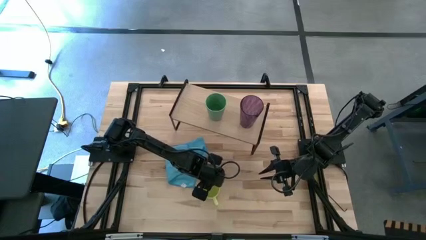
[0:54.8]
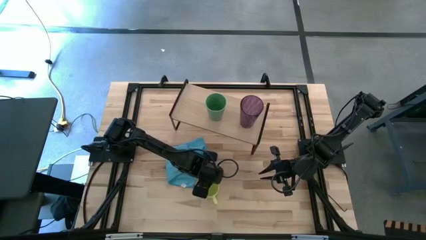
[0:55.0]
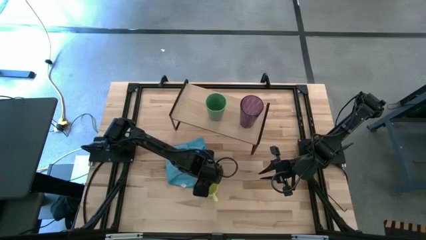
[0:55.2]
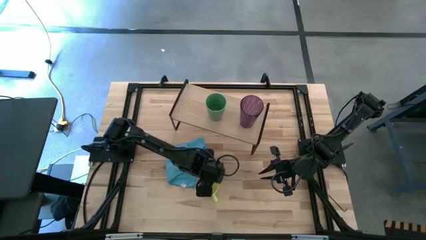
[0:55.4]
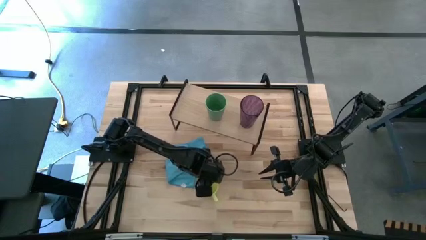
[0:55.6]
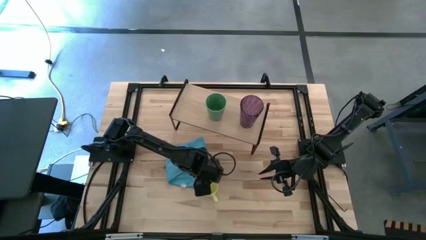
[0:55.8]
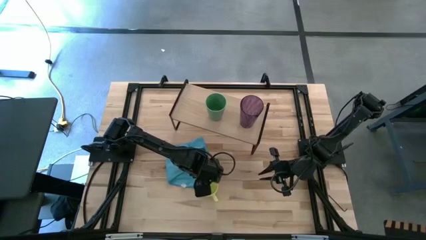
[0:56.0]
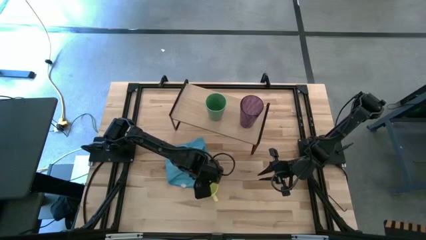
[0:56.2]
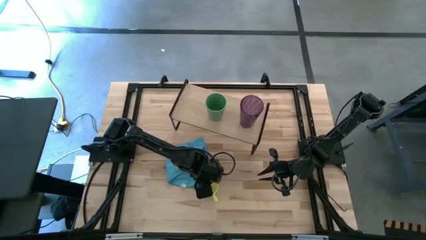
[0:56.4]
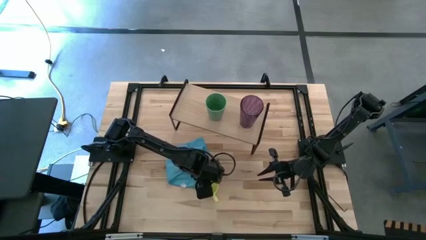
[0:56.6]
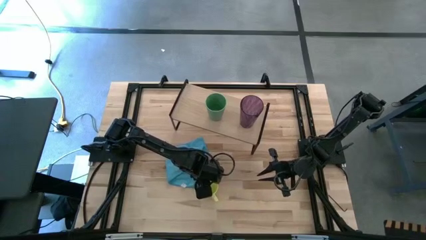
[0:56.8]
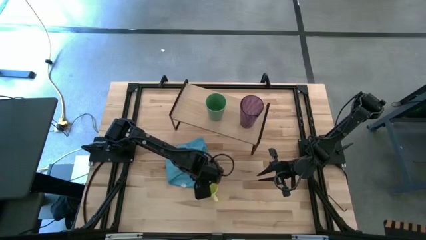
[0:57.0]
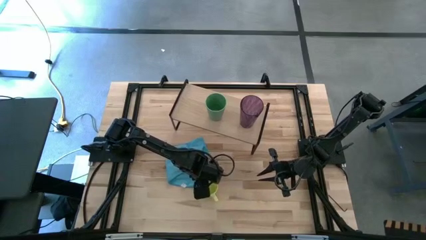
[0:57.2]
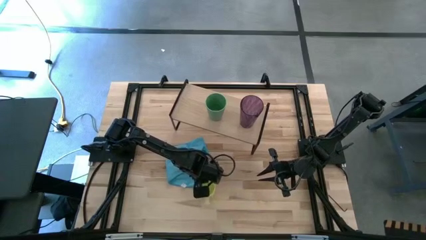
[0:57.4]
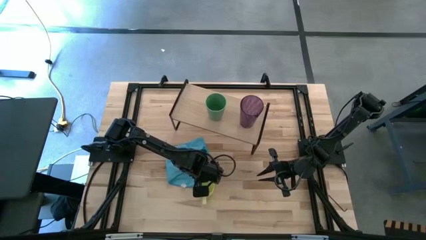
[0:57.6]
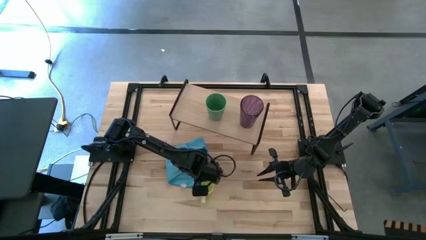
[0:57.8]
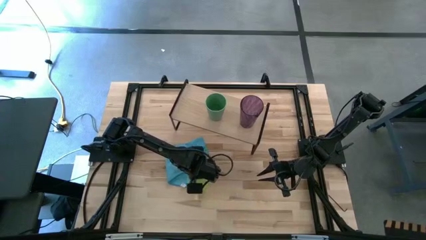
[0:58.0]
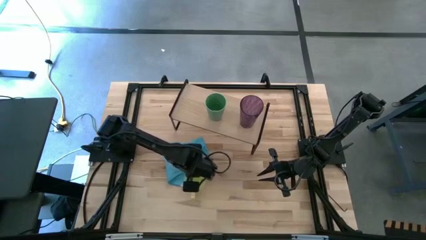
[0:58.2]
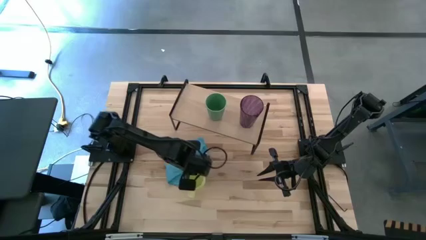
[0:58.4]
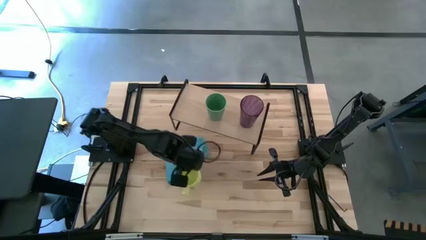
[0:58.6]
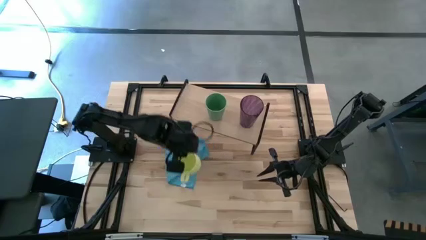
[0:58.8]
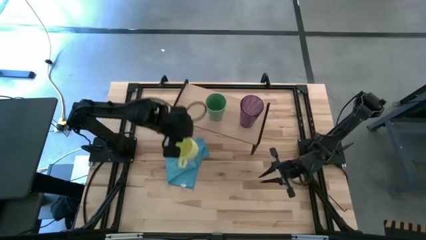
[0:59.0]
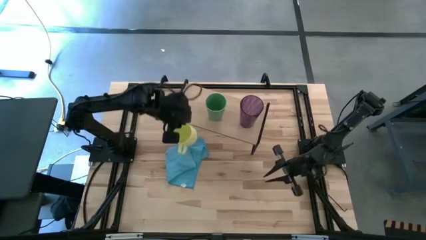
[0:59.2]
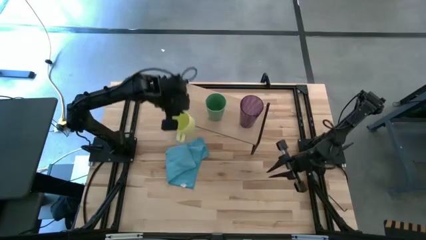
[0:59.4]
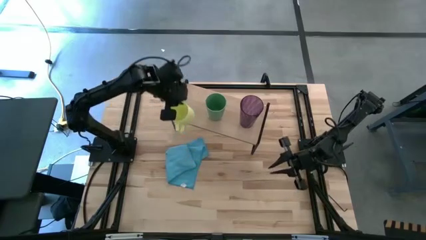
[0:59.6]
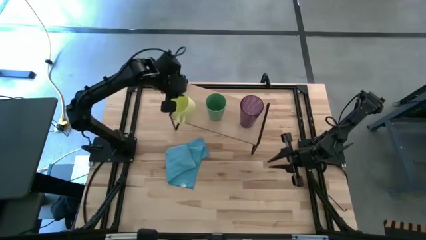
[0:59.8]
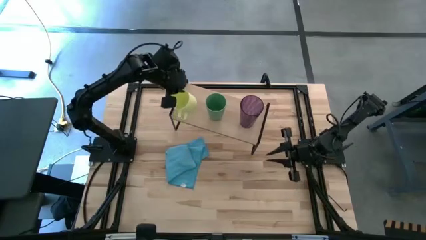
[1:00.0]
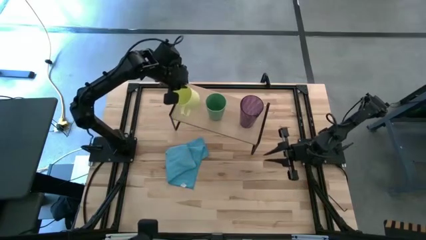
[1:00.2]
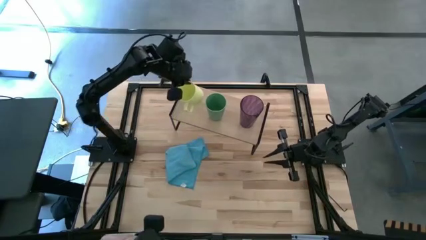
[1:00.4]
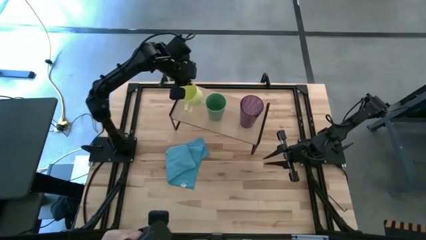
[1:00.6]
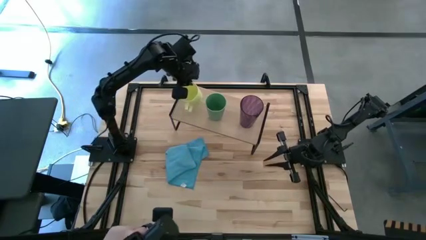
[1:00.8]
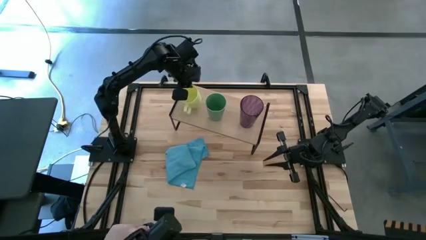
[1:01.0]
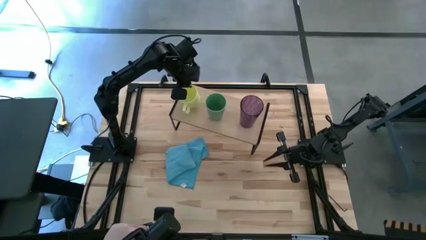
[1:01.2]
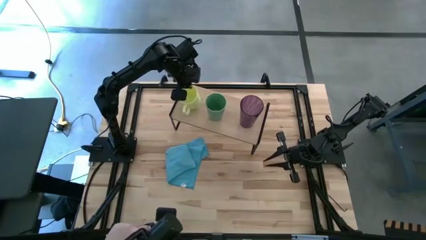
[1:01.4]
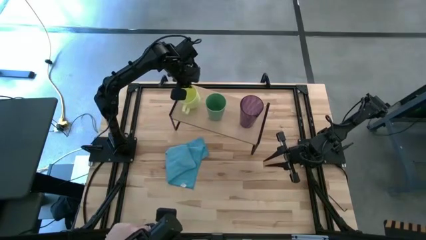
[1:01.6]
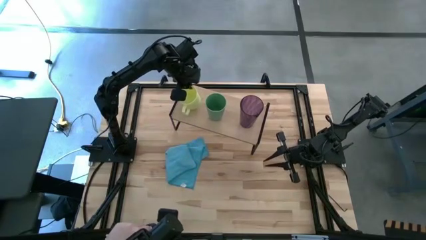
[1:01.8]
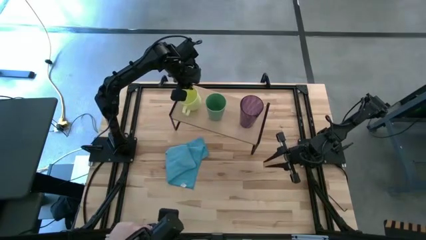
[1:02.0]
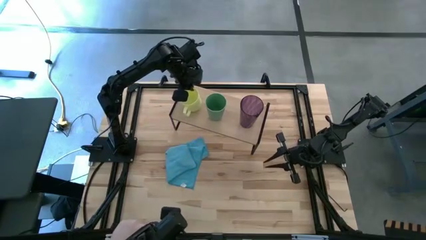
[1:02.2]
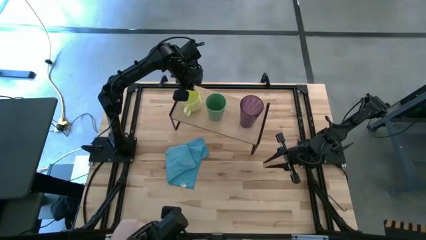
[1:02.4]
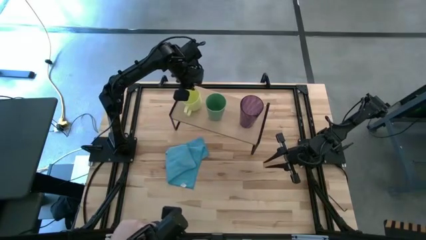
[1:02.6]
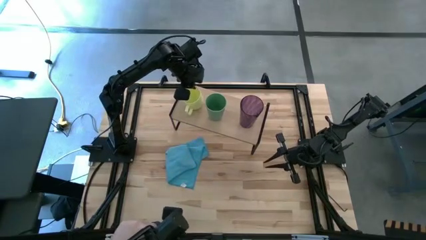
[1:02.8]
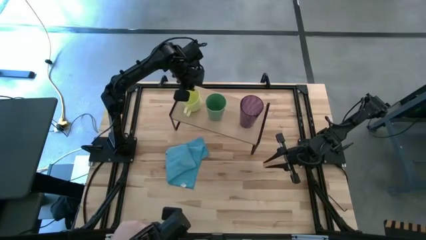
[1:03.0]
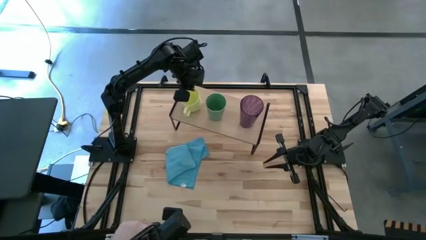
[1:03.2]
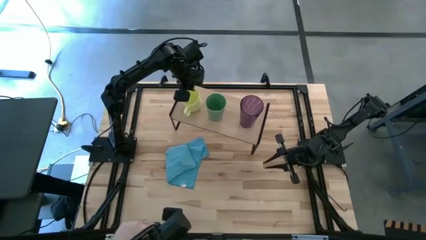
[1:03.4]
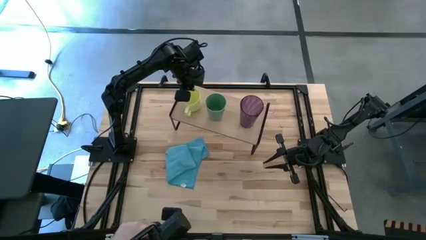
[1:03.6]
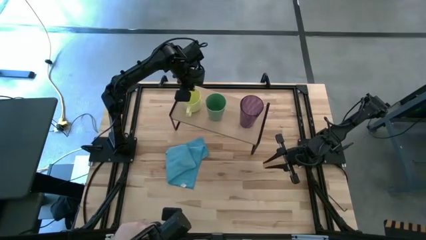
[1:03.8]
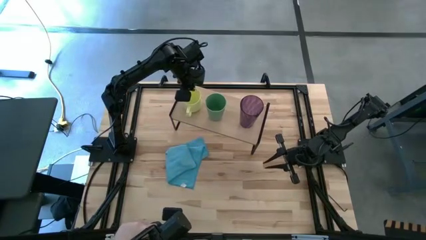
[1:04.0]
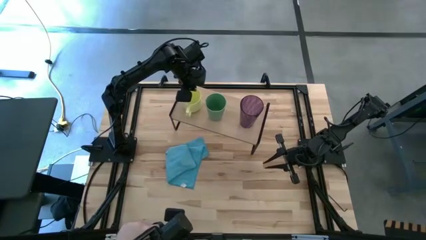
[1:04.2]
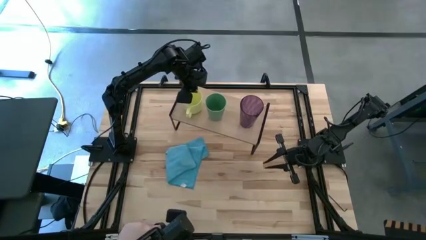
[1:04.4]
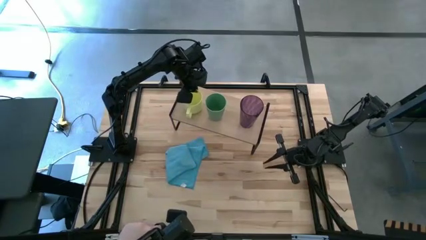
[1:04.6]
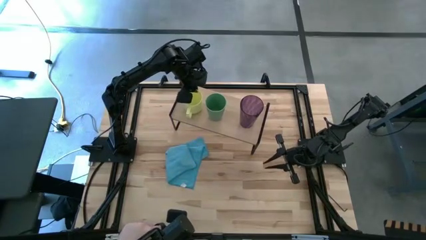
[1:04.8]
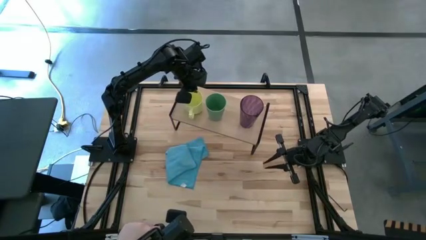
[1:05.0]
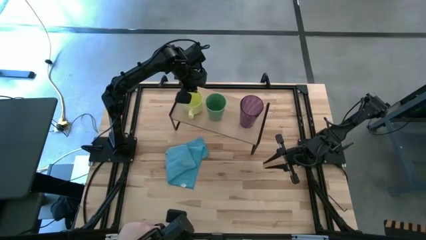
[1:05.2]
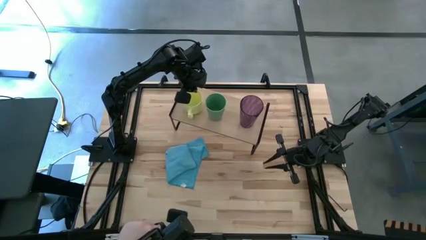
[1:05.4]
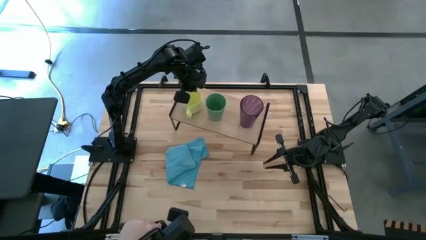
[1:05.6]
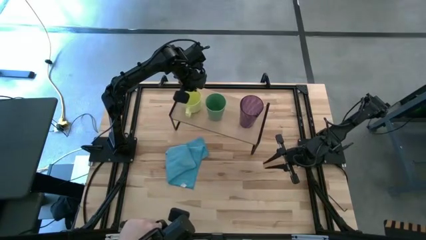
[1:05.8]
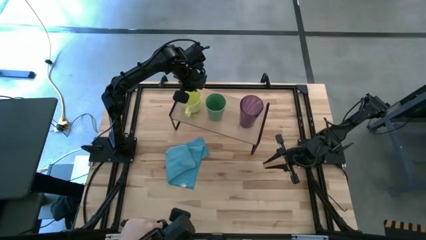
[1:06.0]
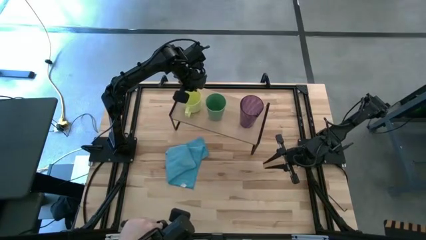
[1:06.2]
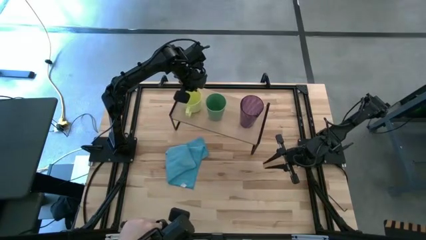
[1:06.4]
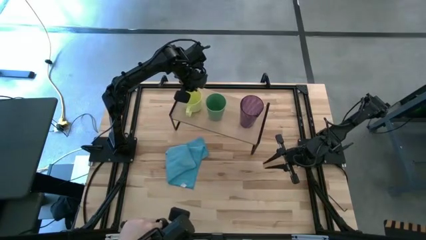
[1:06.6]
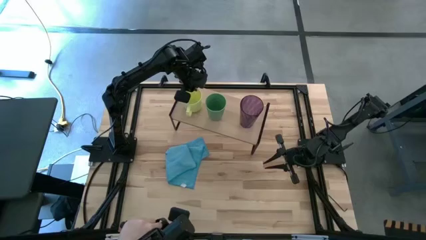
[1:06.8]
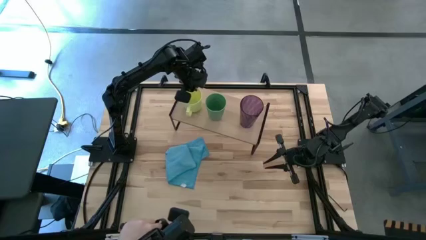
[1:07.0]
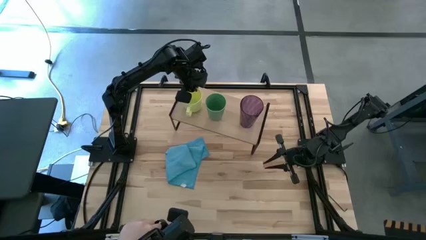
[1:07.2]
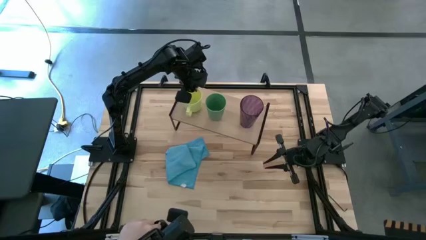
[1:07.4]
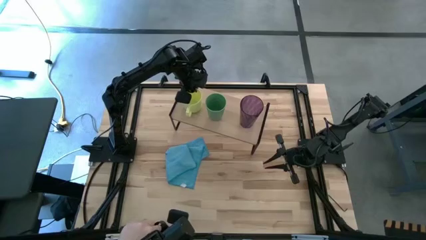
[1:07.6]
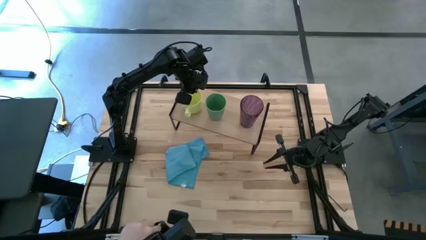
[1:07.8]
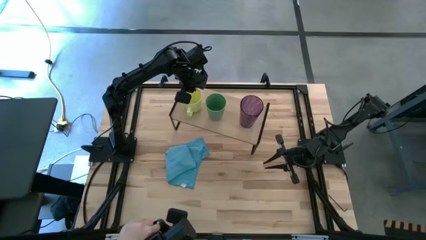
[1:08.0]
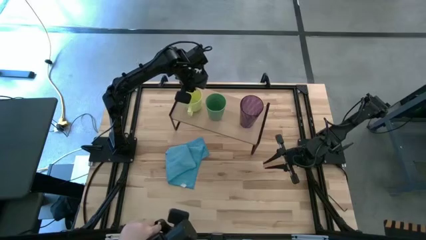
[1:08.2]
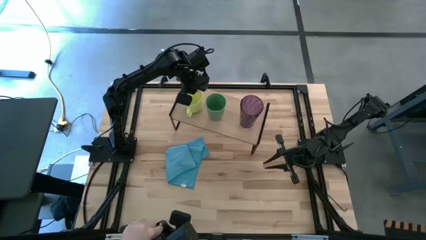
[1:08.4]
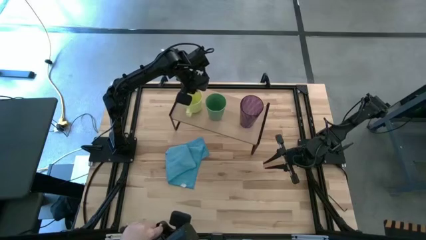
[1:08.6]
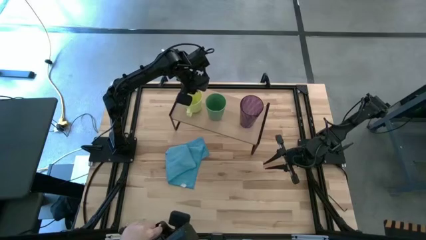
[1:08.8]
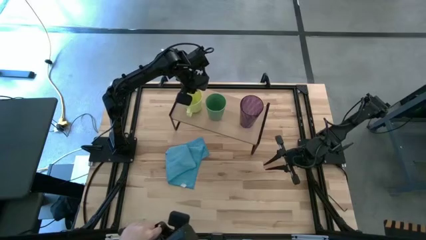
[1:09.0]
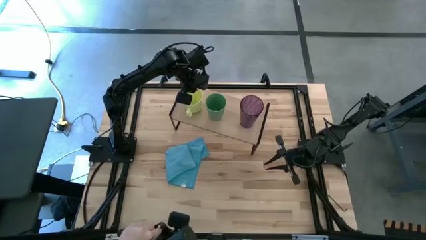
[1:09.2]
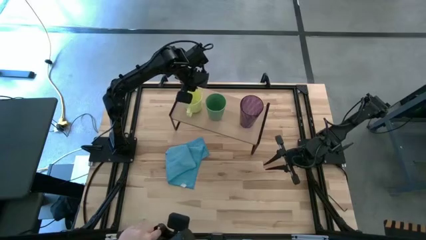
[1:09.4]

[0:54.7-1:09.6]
Task: Stack small to large cups/mugs on shelf
Put the yellow mug on the shelf
